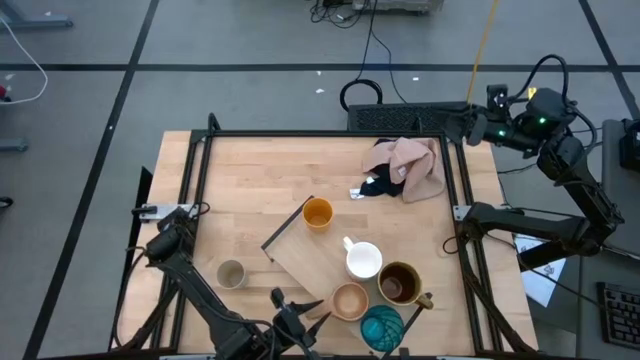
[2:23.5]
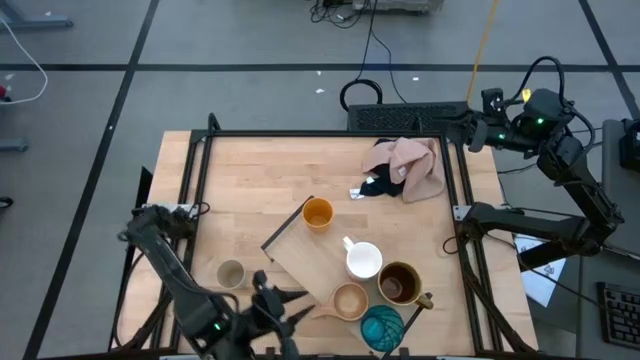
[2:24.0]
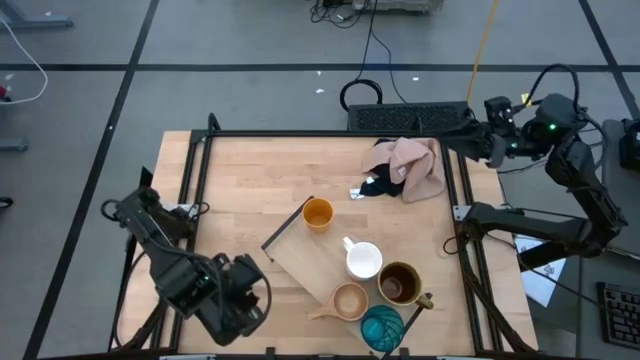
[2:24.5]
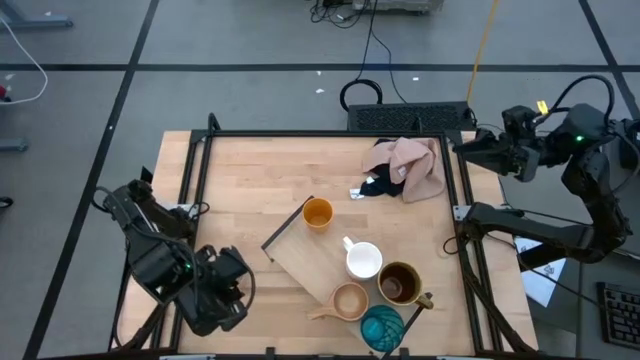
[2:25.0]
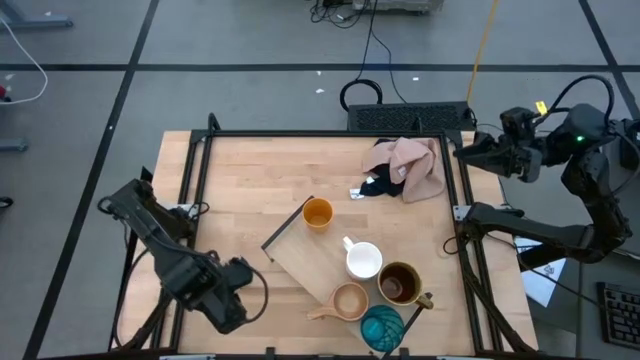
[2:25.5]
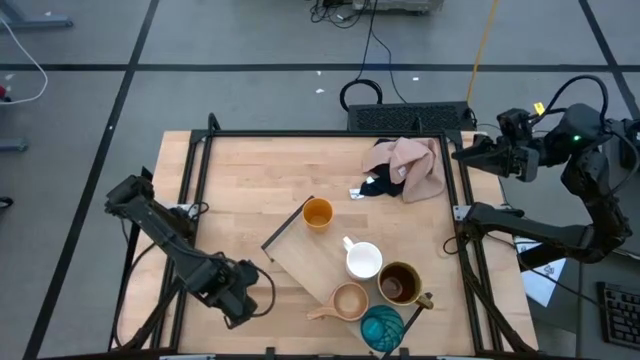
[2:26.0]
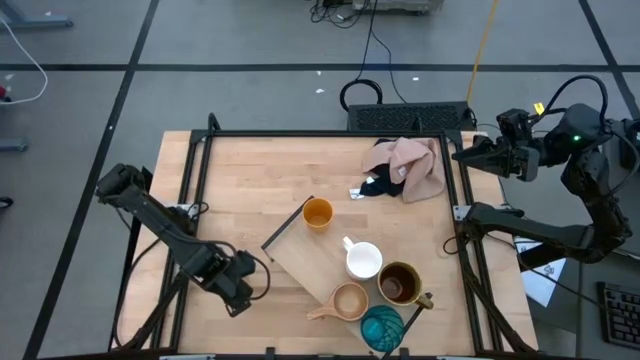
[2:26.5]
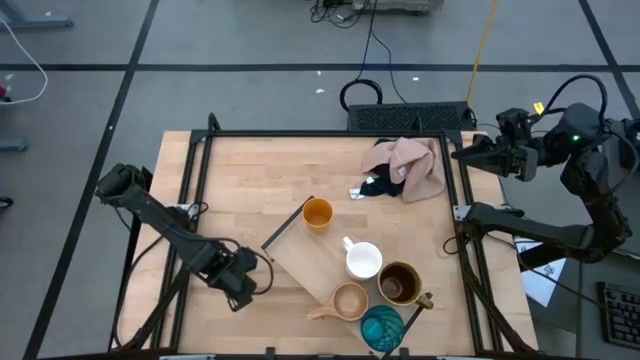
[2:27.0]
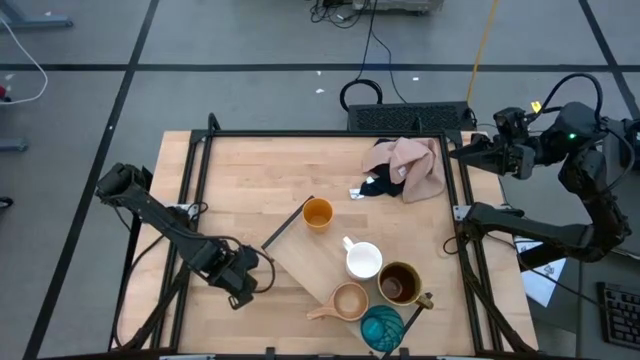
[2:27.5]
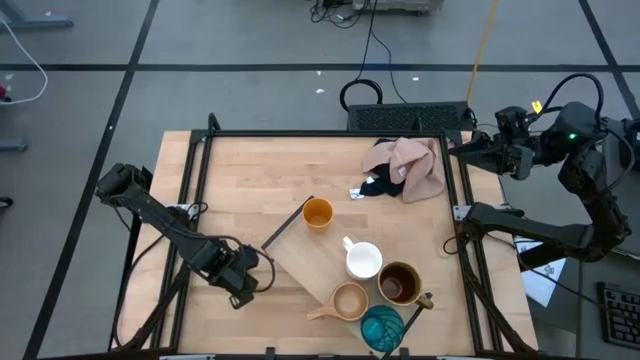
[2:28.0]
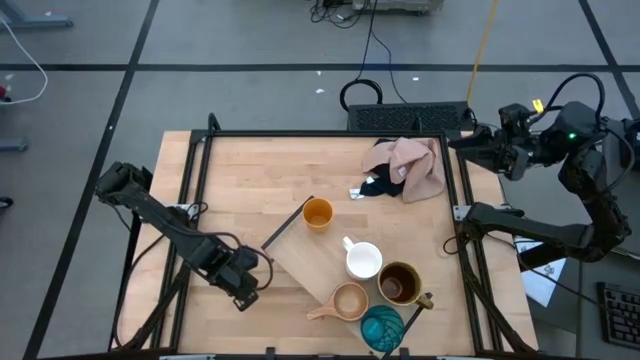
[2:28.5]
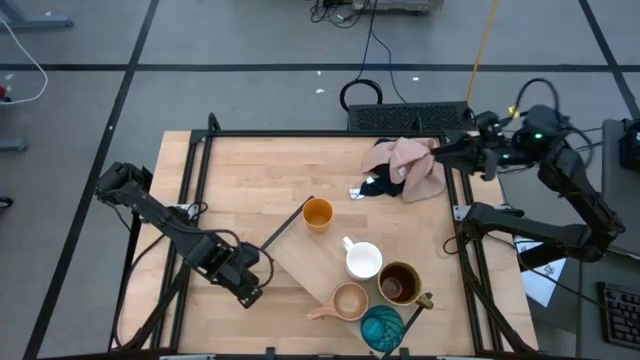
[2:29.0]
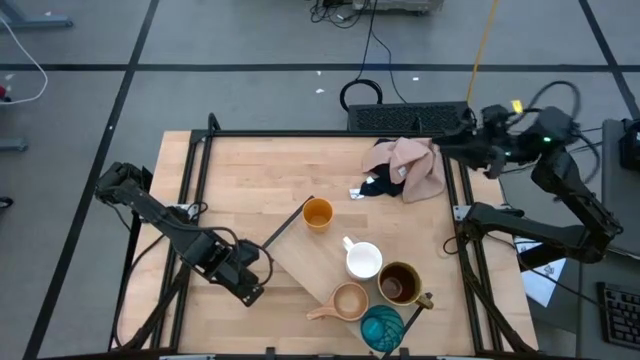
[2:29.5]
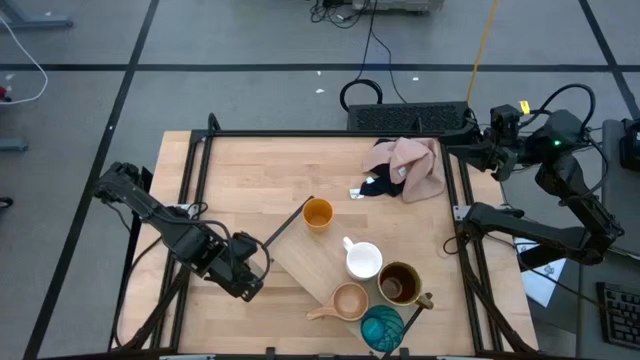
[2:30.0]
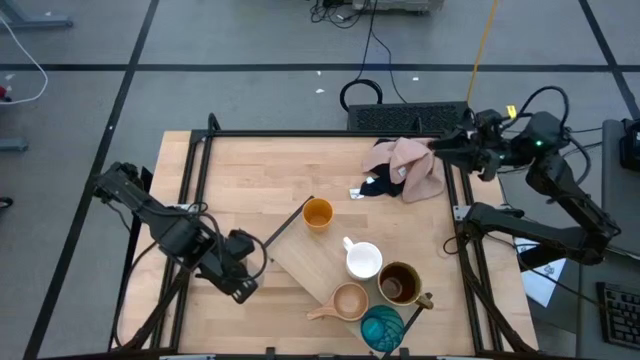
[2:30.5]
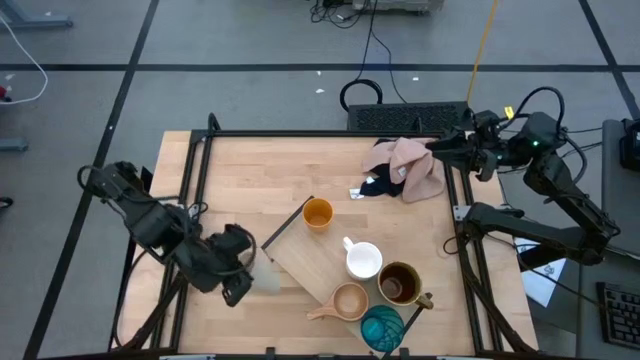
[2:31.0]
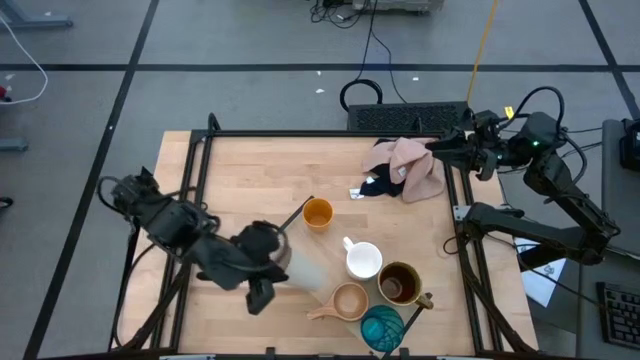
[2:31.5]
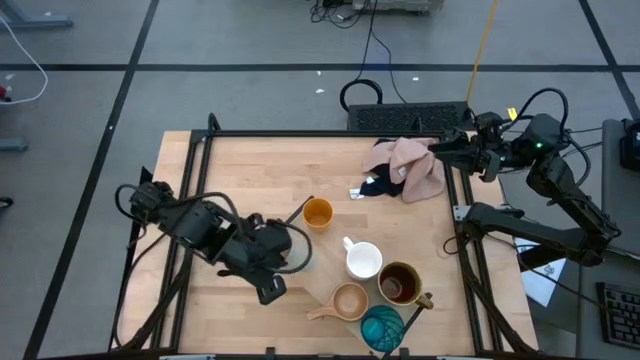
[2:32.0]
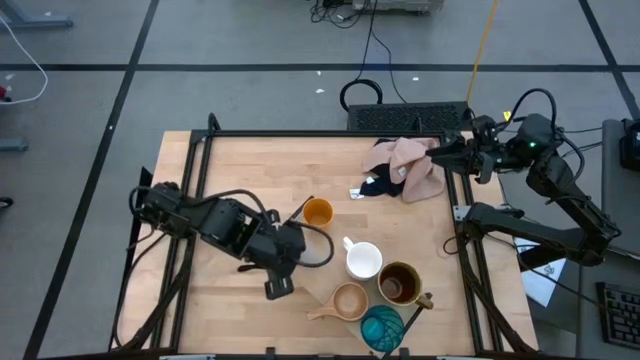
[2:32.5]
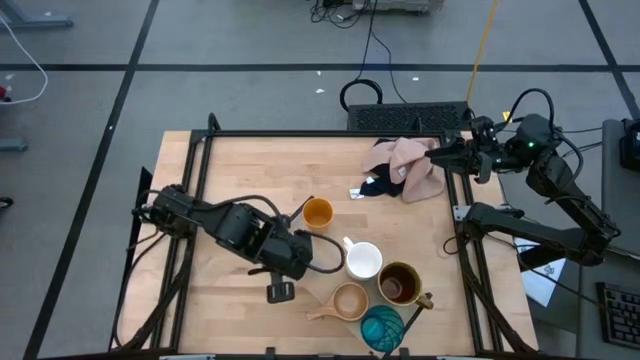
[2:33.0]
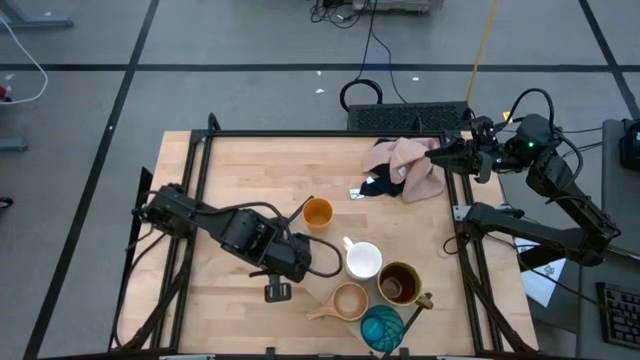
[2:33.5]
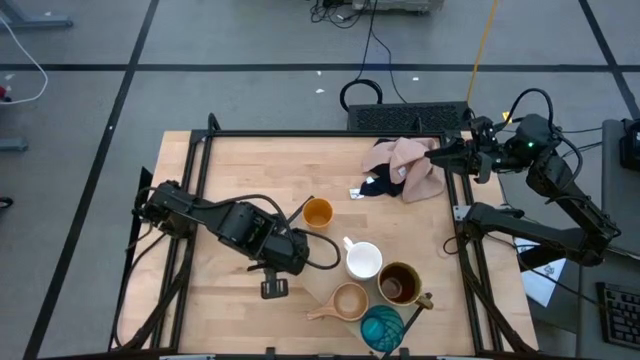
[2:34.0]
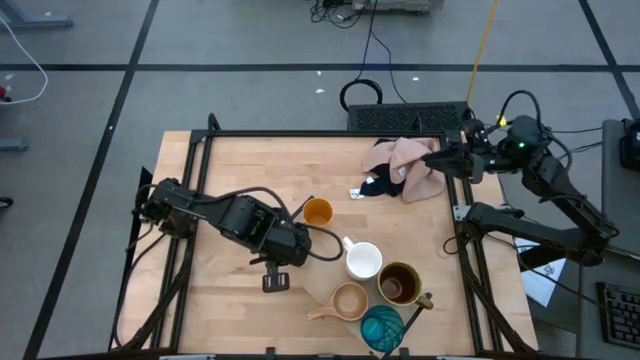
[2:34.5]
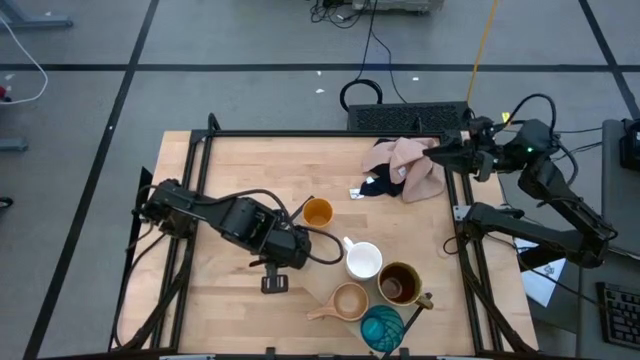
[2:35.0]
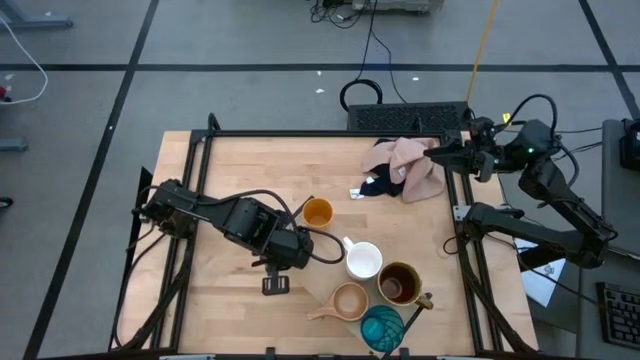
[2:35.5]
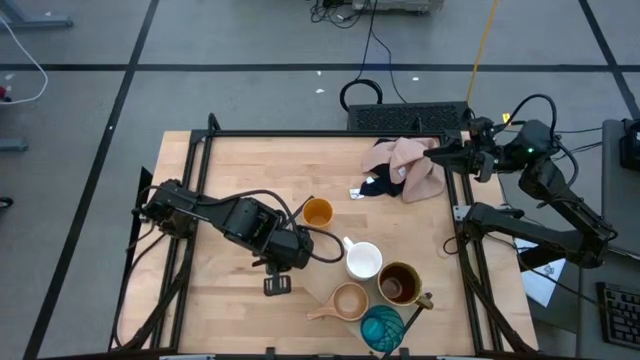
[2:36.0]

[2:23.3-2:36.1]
Task: Stack small to large cups/mugs on shelf
Put the white cup on the shelf

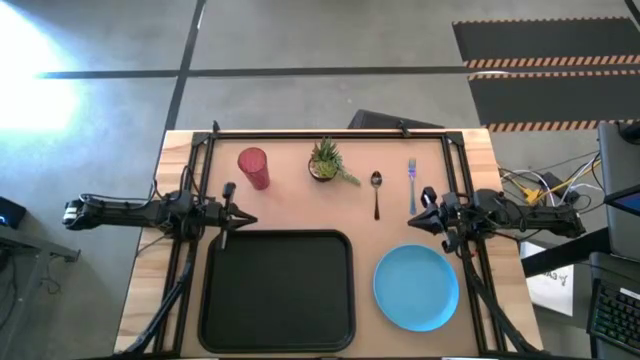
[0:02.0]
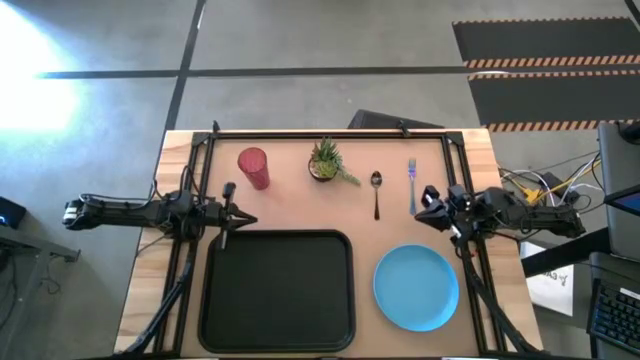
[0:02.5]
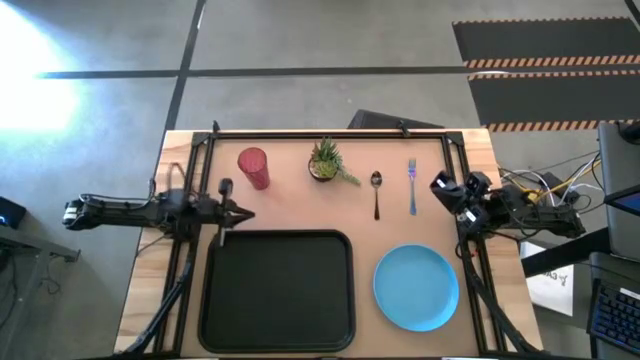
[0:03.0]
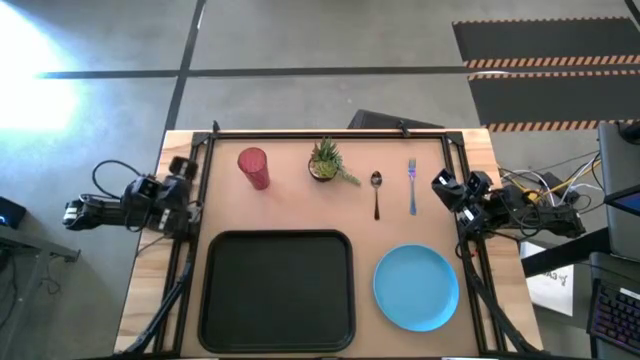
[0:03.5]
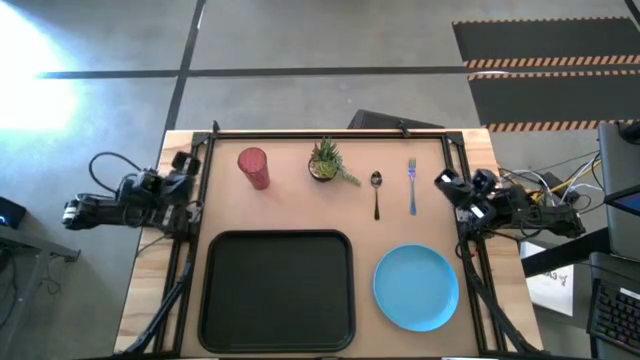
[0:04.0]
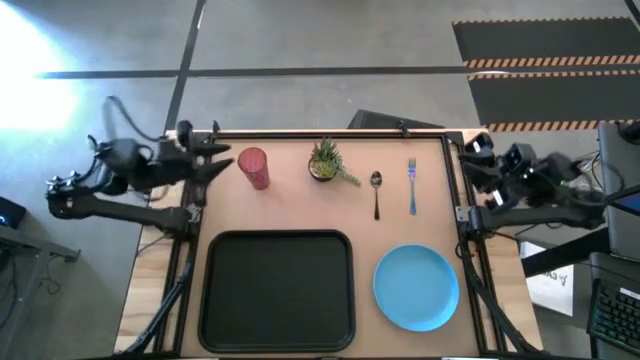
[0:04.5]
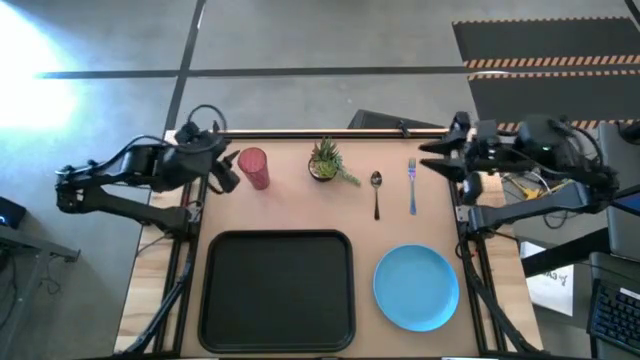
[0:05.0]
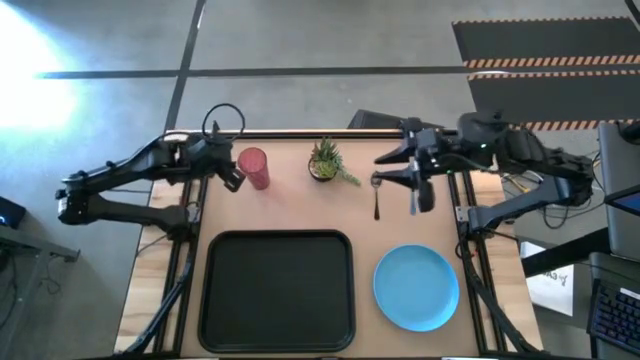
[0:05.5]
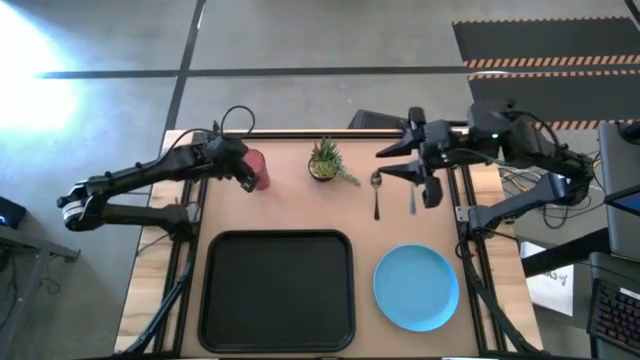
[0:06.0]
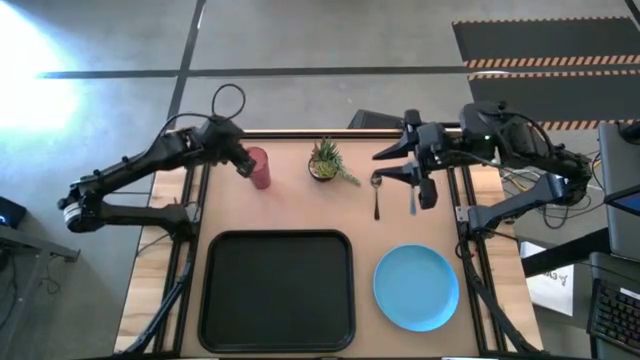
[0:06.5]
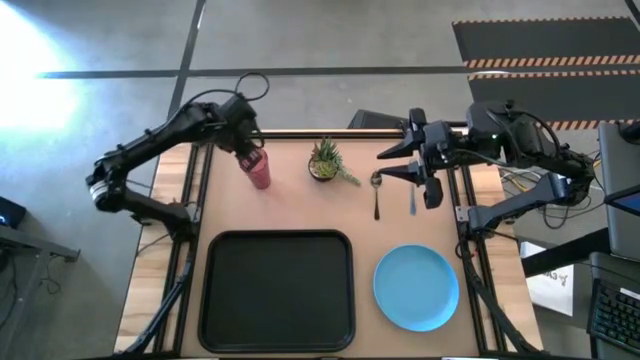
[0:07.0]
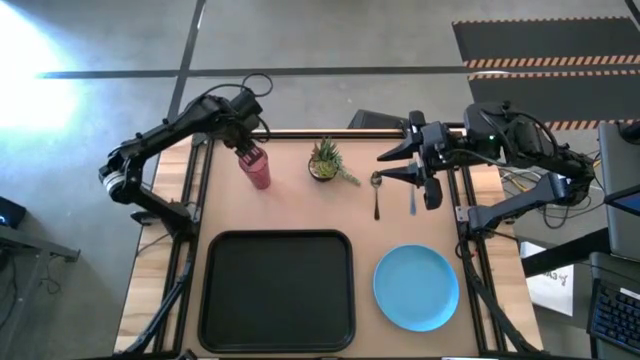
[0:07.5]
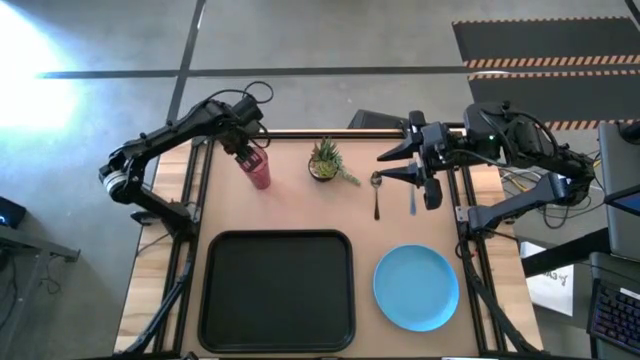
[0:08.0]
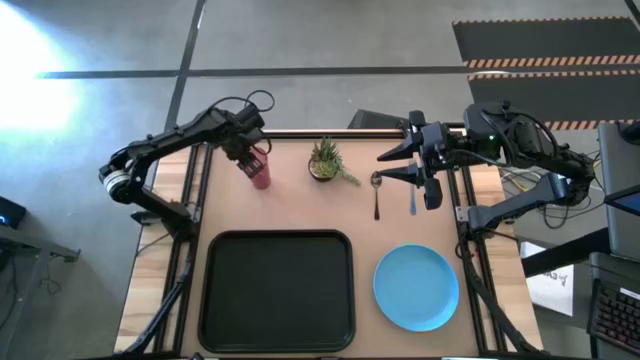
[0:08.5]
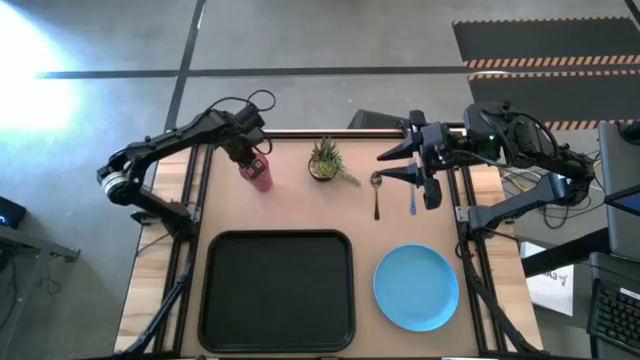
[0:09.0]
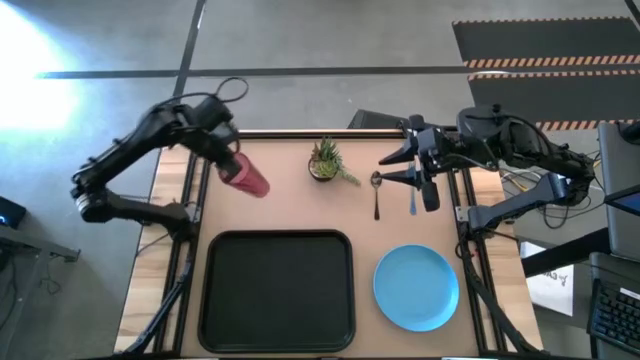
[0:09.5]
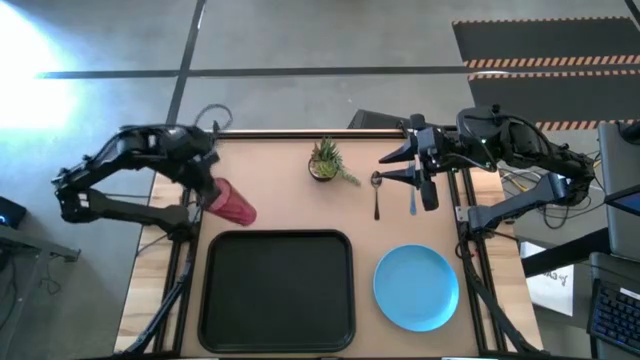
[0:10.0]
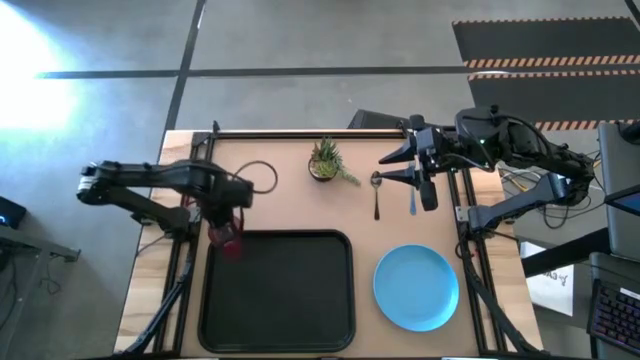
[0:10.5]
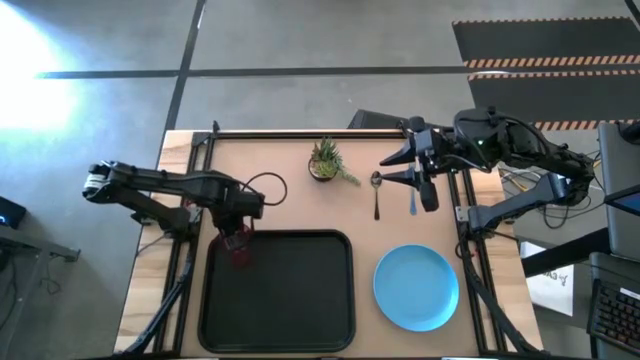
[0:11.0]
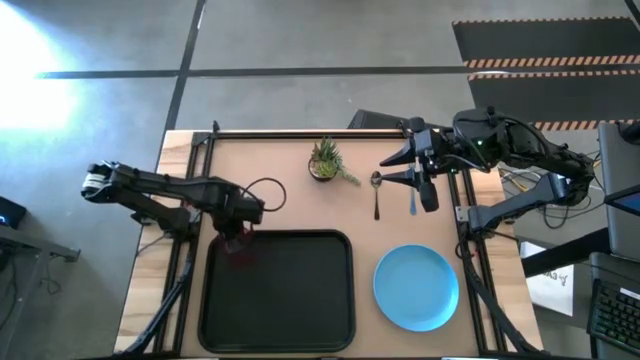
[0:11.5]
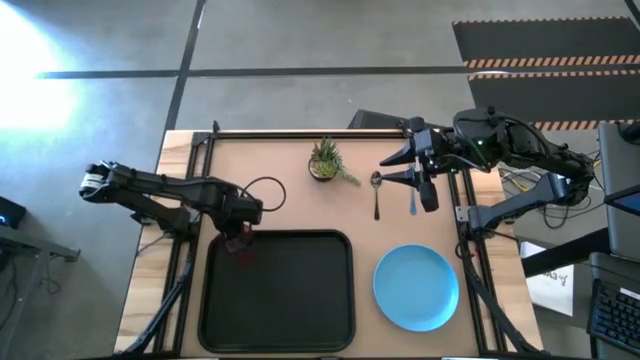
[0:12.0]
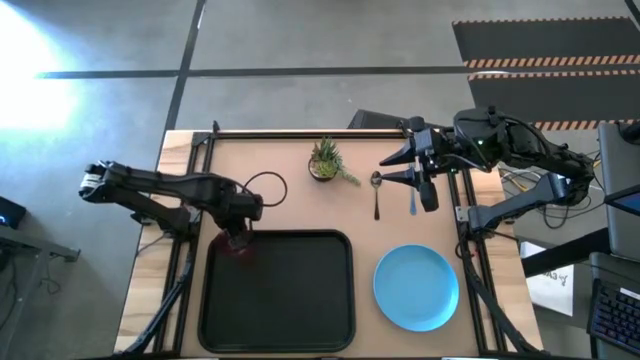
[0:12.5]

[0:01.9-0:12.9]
Task: Pick and place plate/cup/fork/spoon on tray
Put the purple cup on the black serving tray
